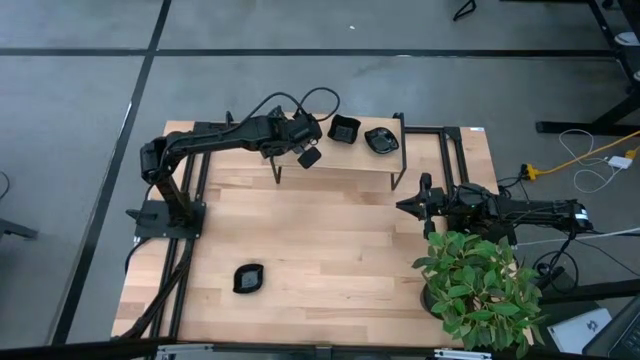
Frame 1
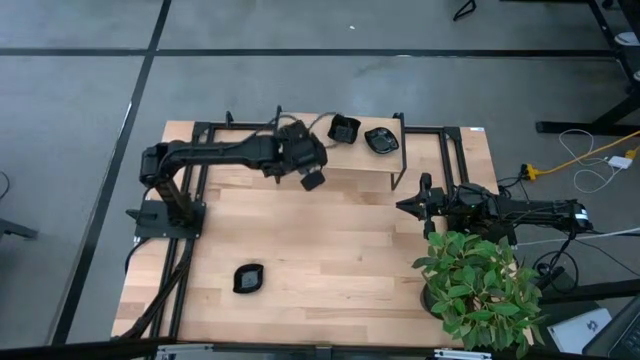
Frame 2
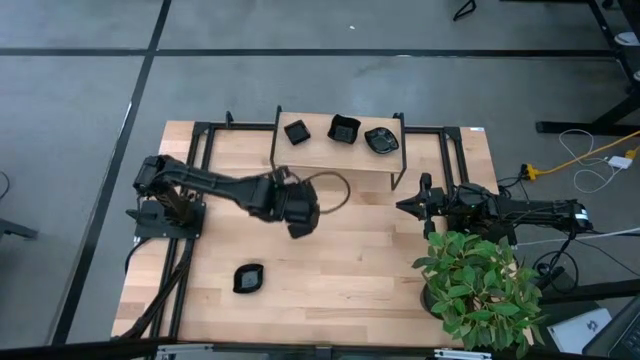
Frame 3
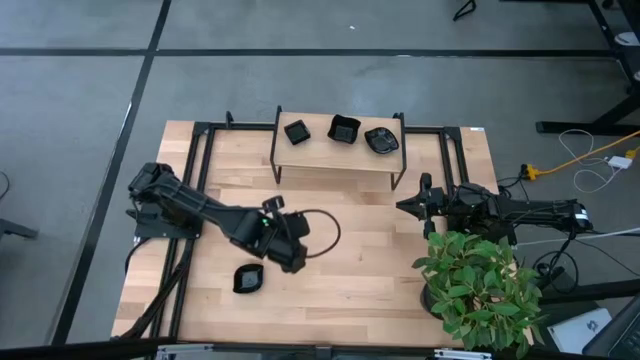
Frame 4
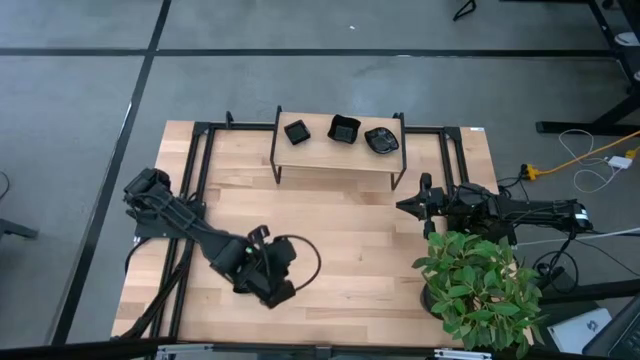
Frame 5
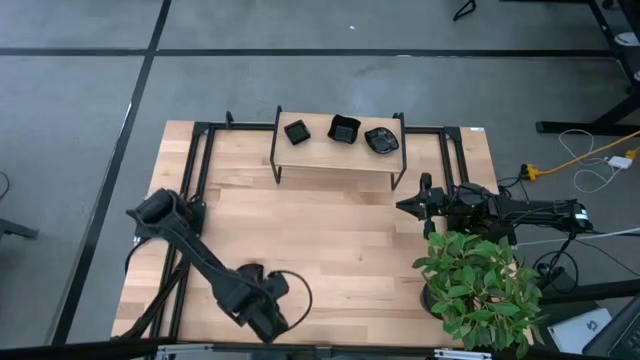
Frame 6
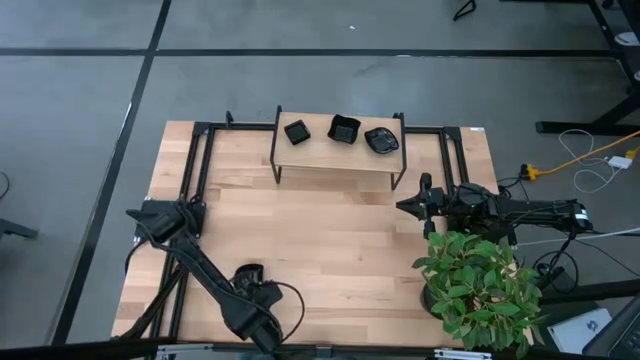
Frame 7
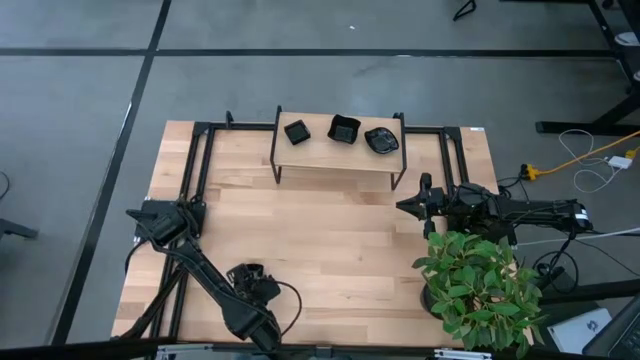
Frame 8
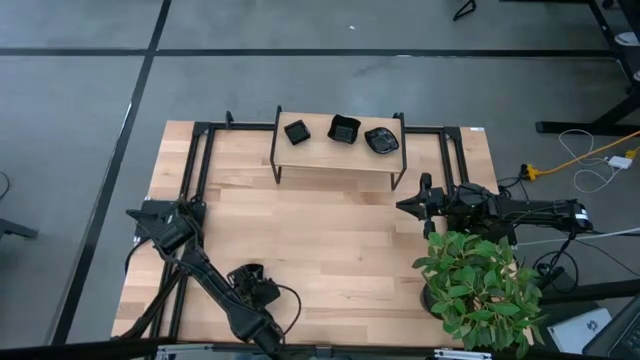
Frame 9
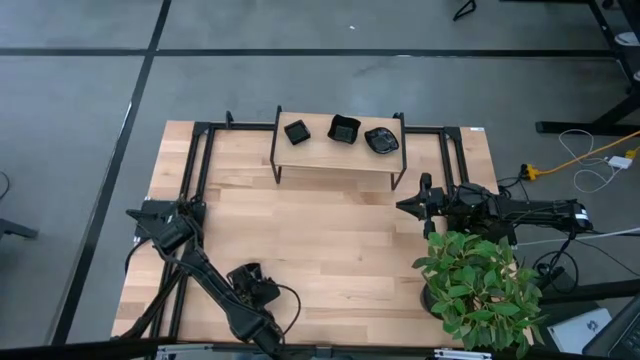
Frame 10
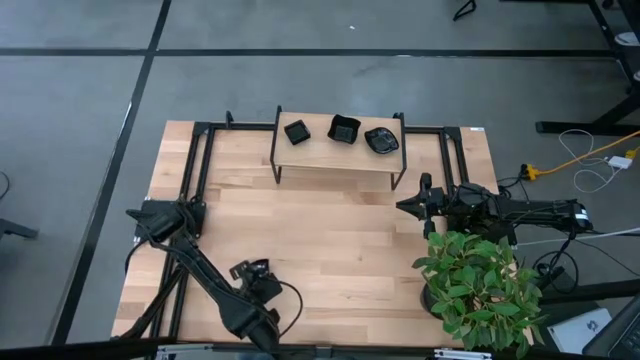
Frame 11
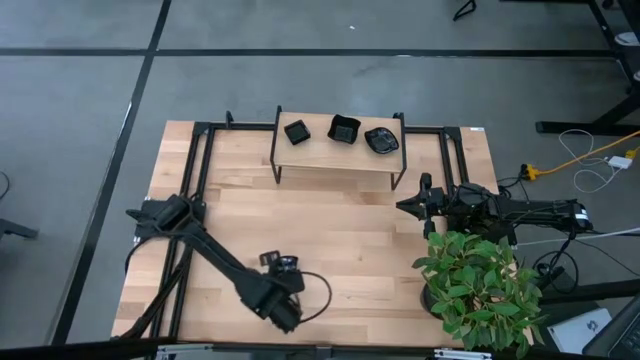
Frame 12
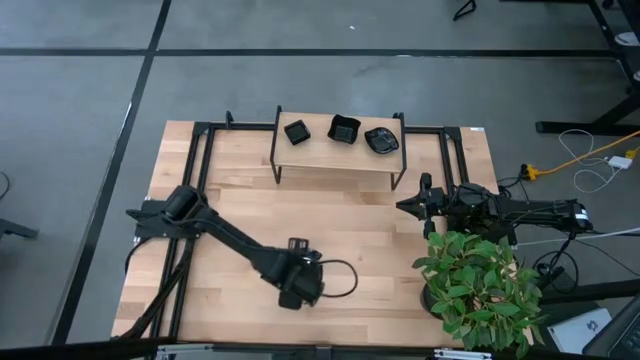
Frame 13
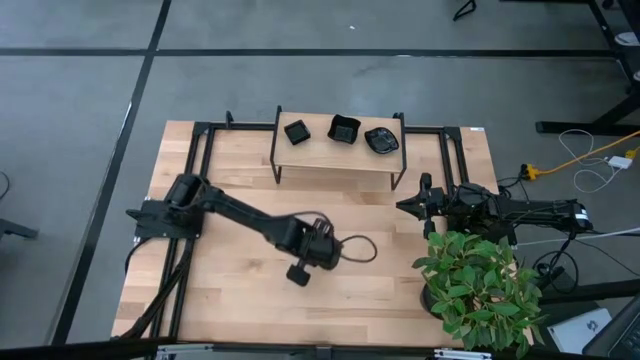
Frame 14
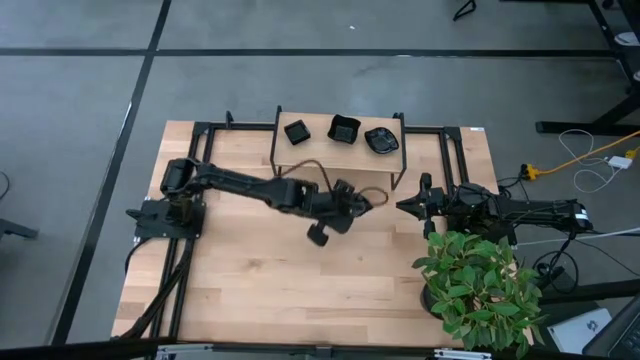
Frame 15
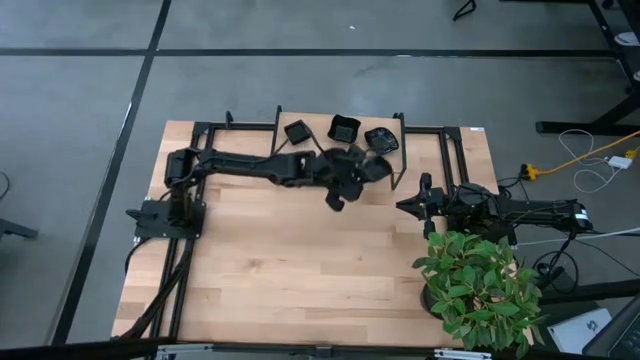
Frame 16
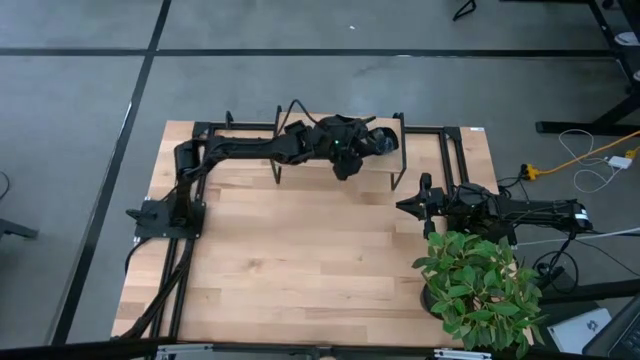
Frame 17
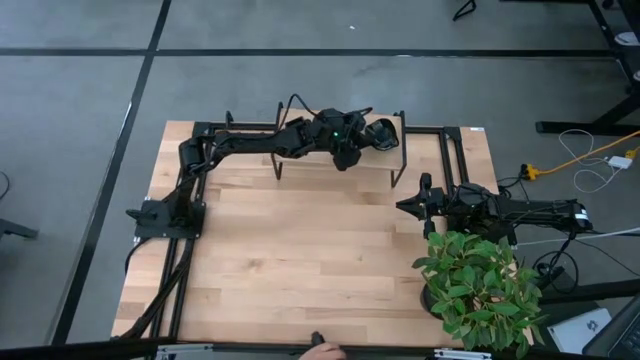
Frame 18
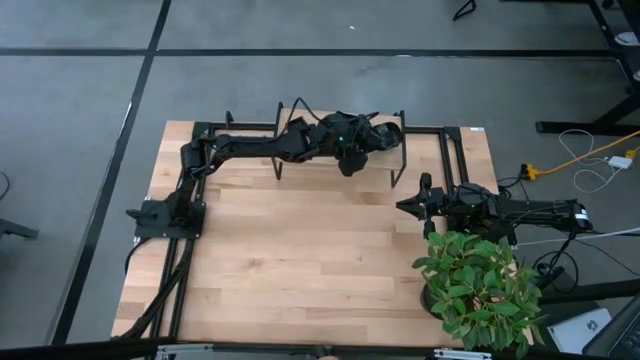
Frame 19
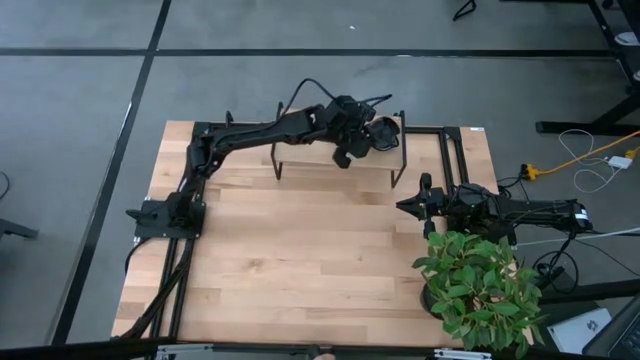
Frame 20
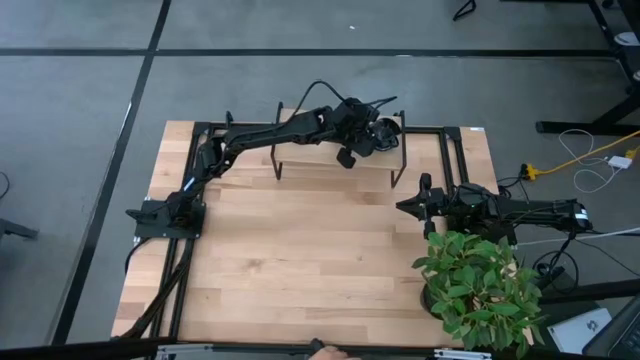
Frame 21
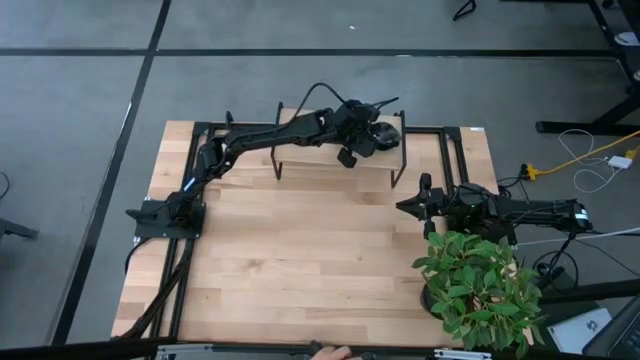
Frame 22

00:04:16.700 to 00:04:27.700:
Task: Pick & Place Mini shaped plates
Stack the leaf-shaped plate on top of the leaf-shaped plate on the shelf

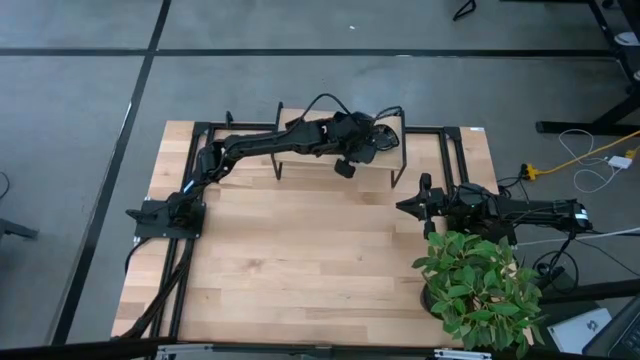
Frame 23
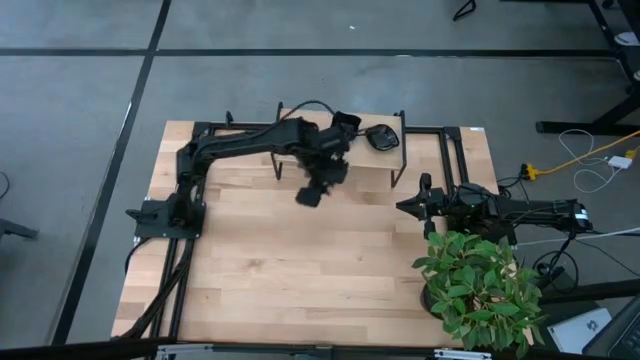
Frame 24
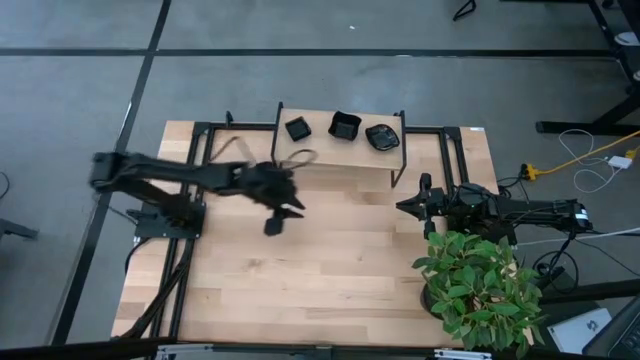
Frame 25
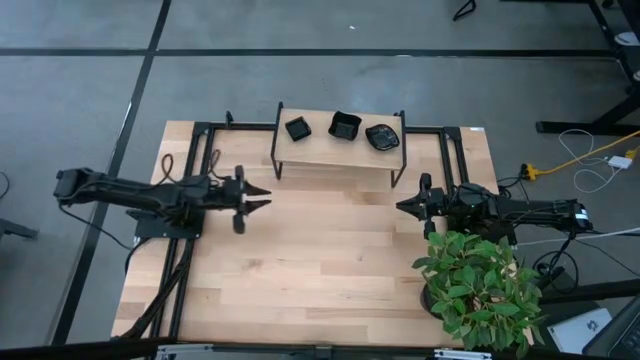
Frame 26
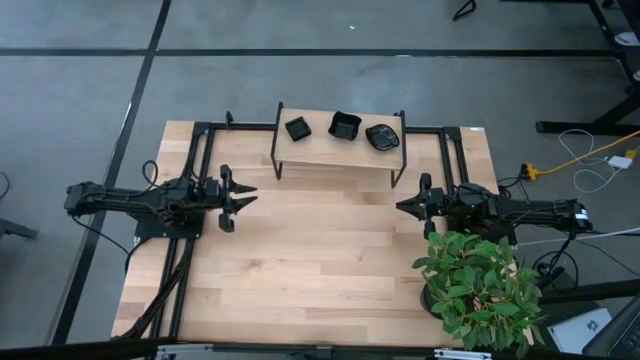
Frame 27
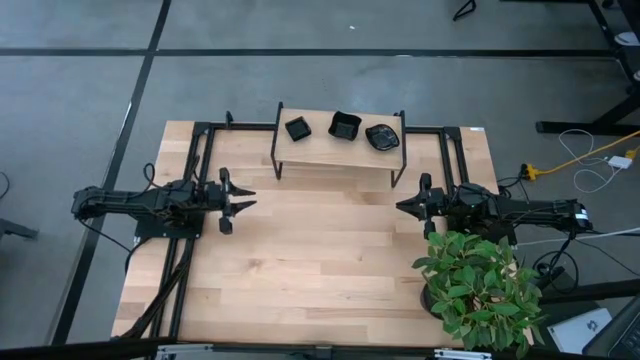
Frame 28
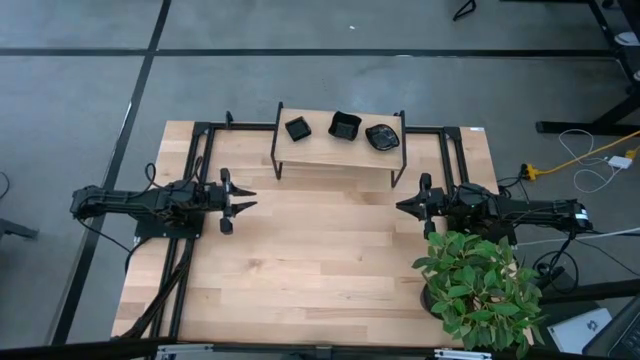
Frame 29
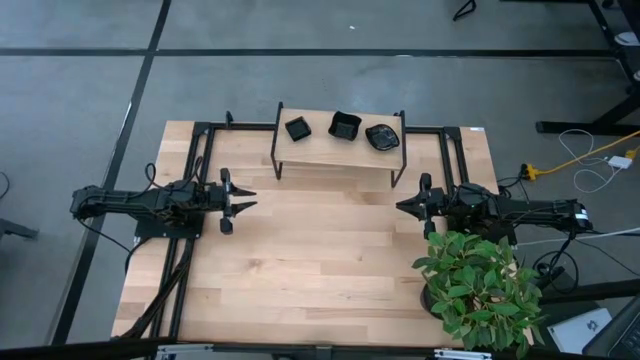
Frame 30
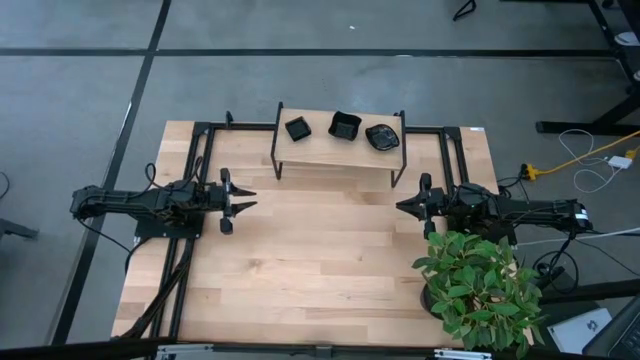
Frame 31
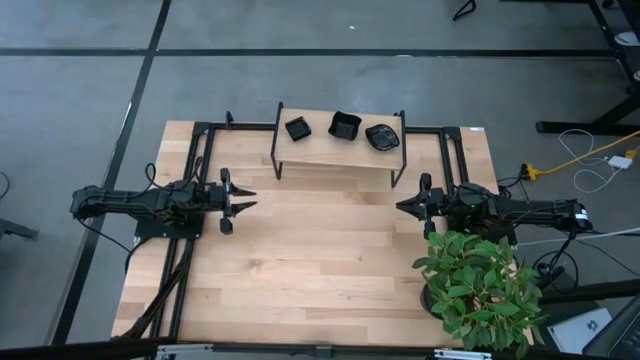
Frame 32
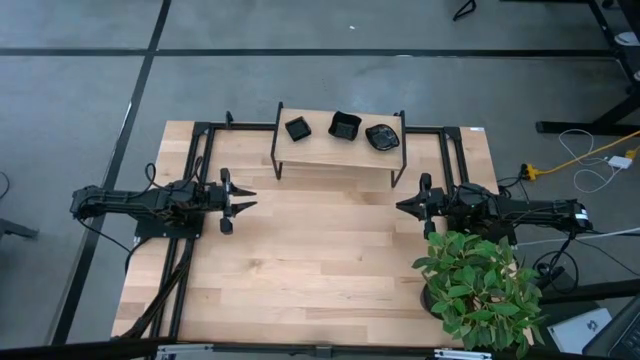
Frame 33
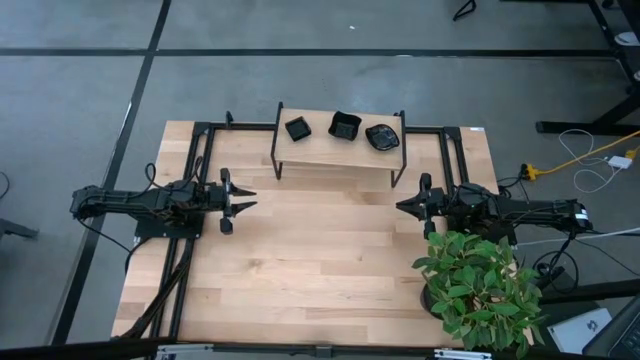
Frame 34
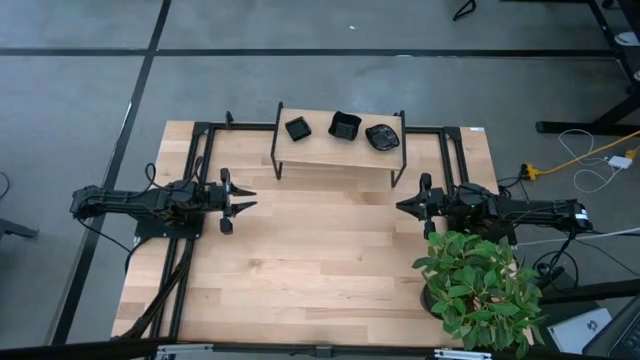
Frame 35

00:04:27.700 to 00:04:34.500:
Return to Home Position

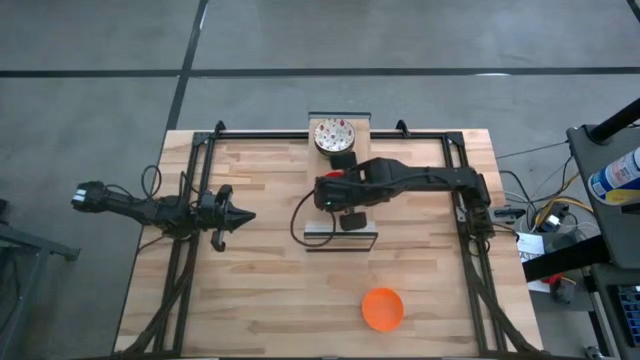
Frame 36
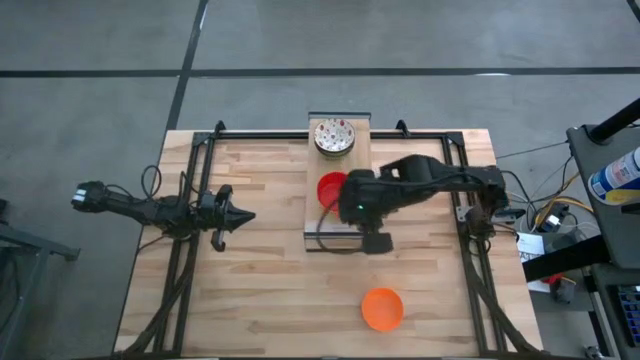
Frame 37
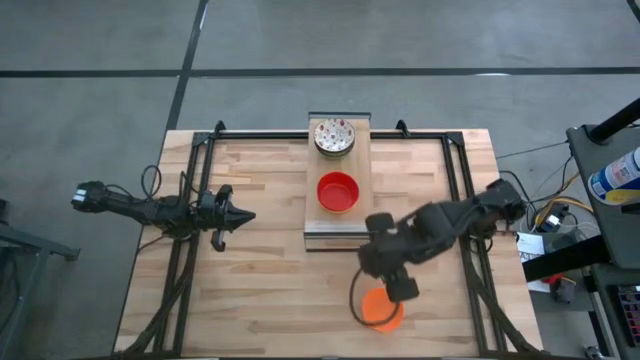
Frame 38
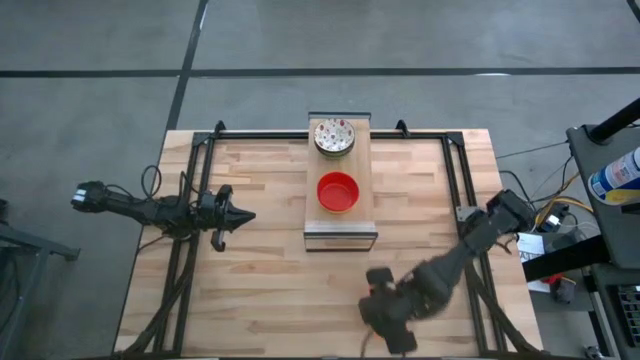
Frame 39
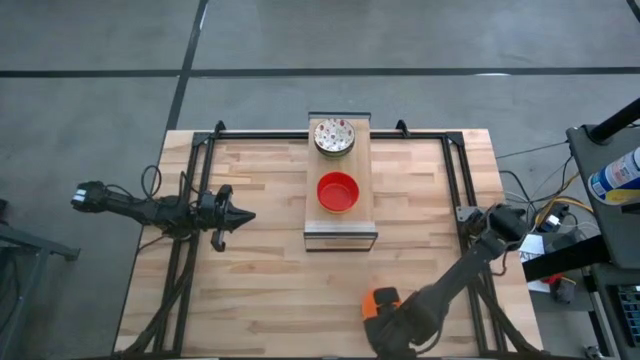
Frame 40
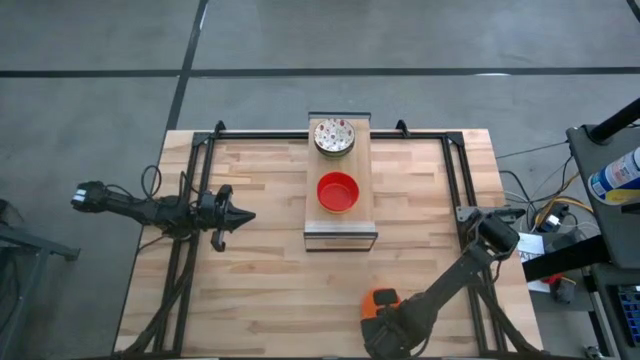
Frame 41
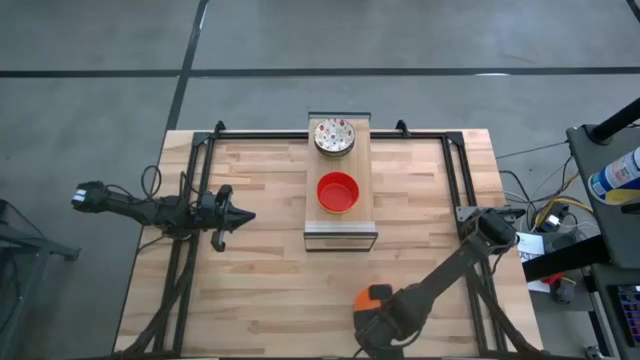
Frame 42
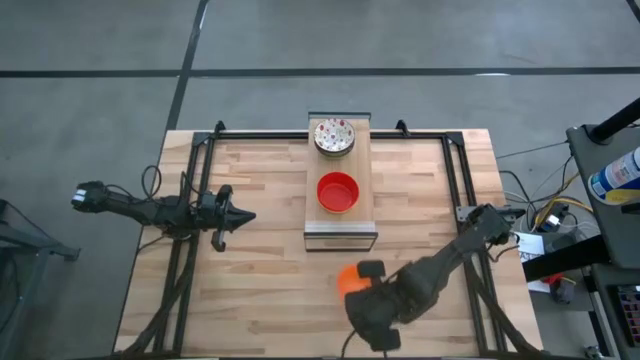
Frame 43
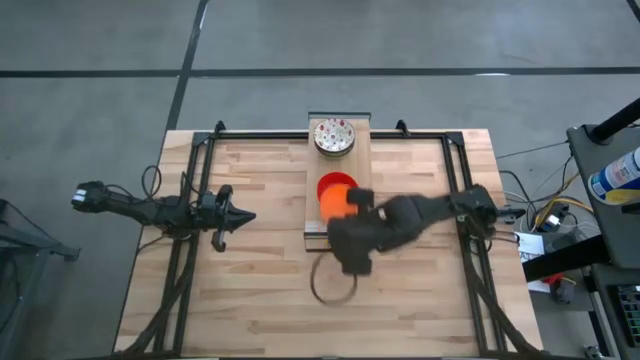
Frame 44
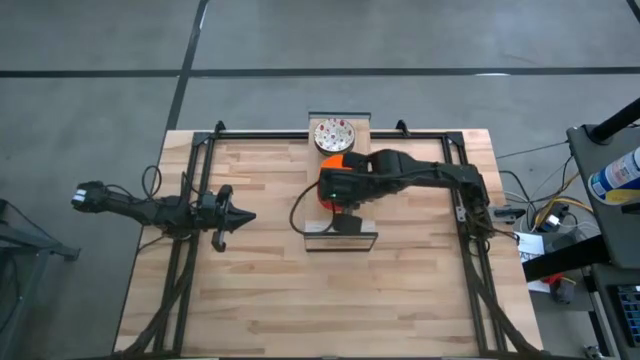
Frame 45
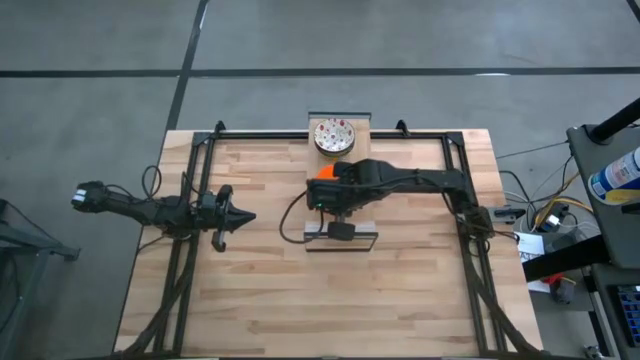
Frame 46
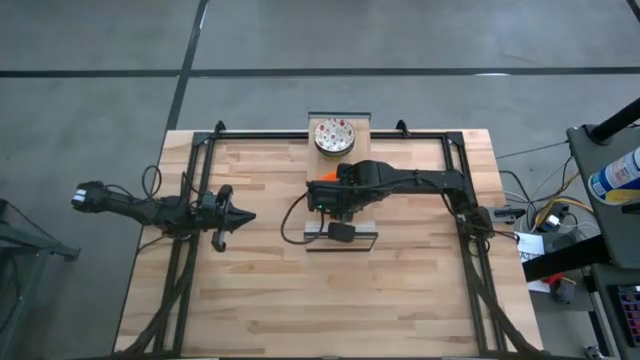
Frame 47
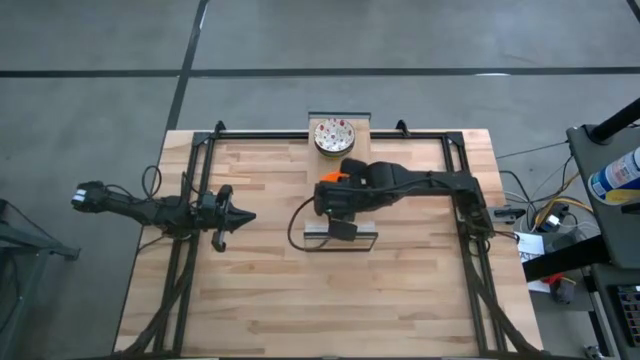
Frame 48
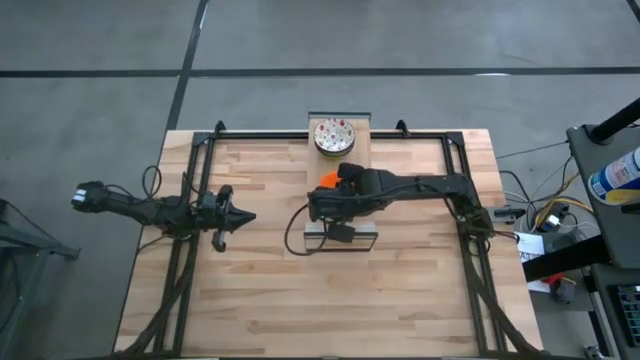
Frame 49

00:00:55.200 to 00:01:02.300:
Task: Pick & Place Mini bowls
Stack the orange bowl on top of the red bowl on the shelf
